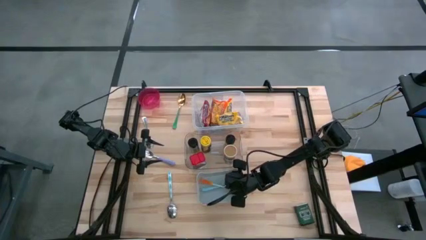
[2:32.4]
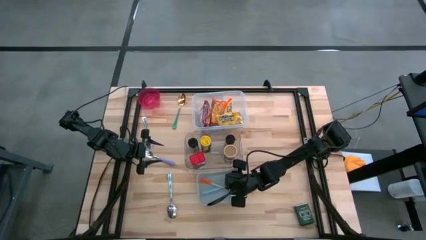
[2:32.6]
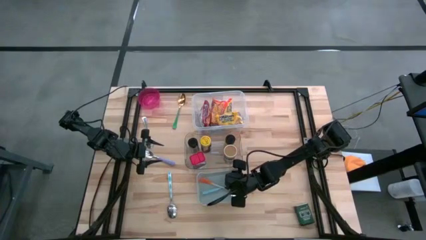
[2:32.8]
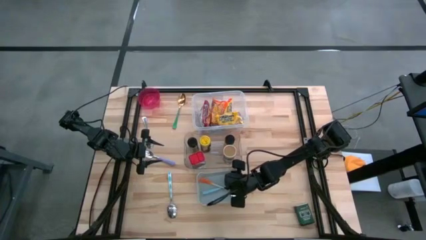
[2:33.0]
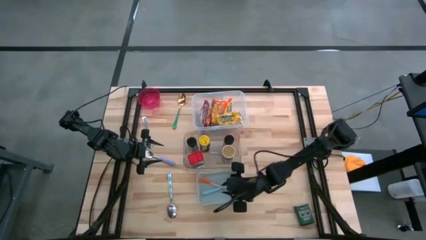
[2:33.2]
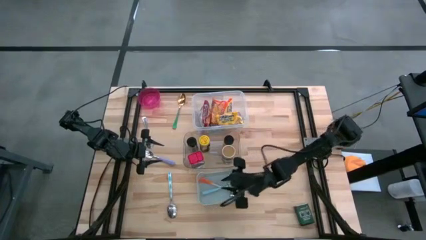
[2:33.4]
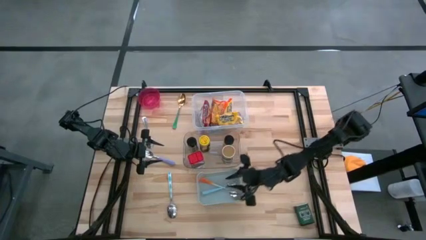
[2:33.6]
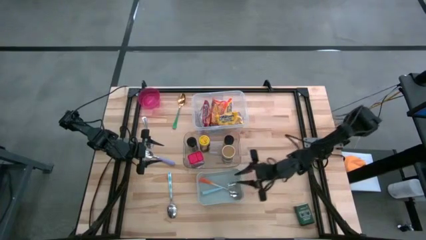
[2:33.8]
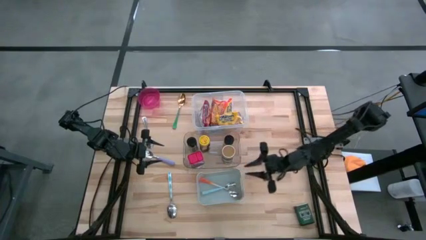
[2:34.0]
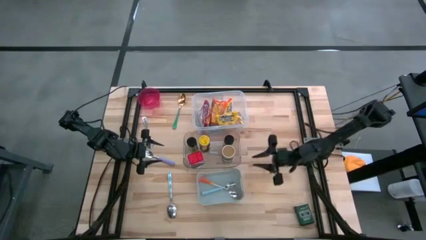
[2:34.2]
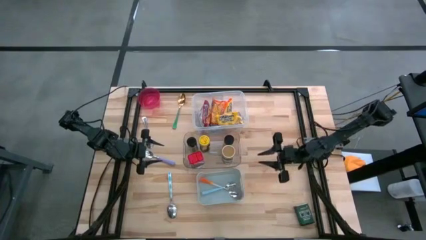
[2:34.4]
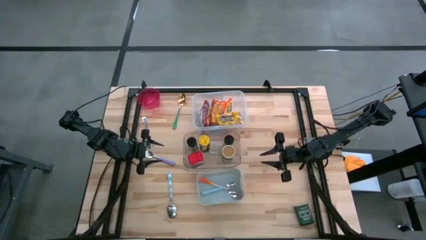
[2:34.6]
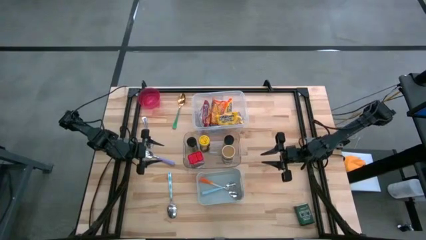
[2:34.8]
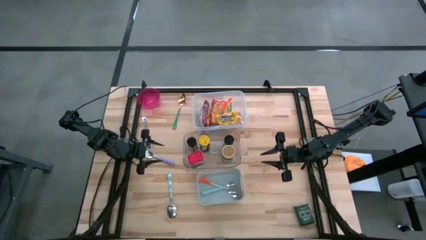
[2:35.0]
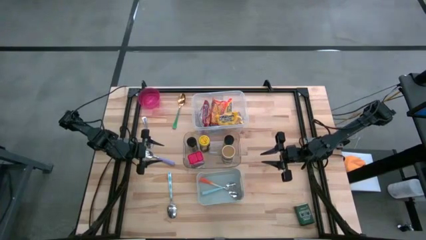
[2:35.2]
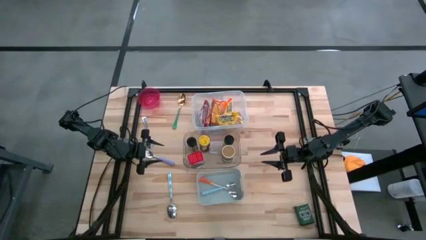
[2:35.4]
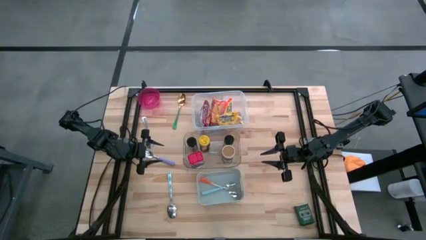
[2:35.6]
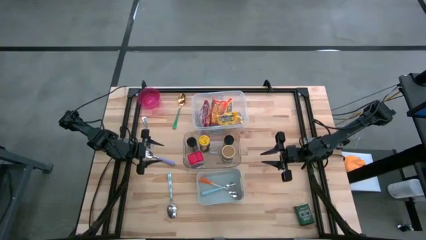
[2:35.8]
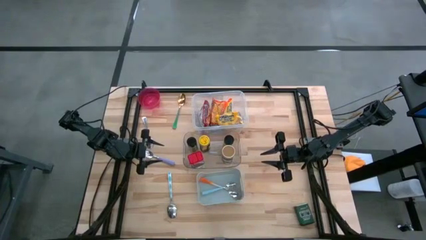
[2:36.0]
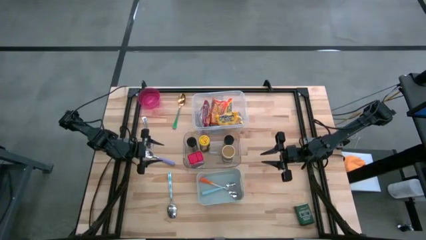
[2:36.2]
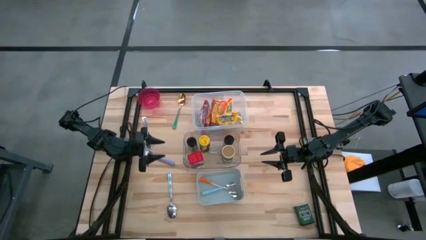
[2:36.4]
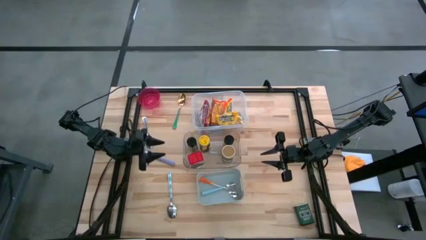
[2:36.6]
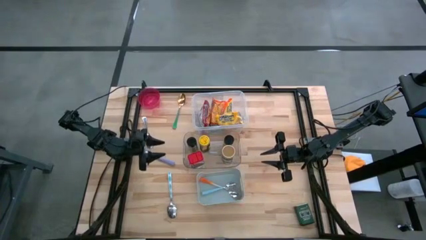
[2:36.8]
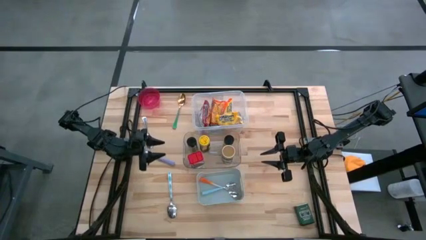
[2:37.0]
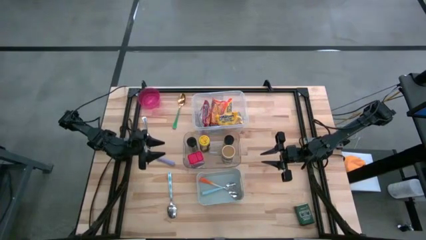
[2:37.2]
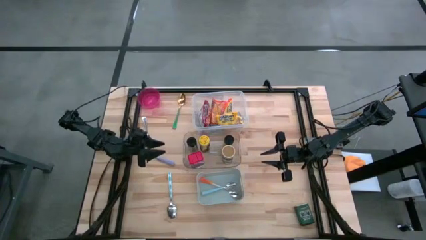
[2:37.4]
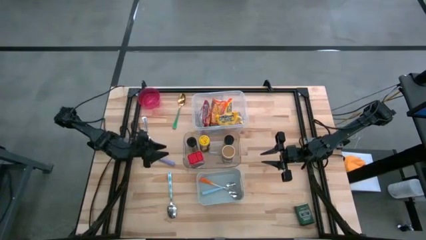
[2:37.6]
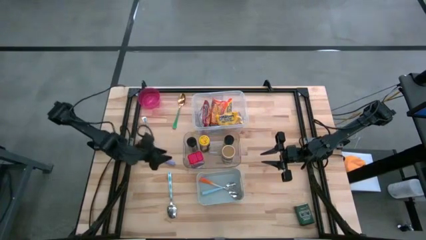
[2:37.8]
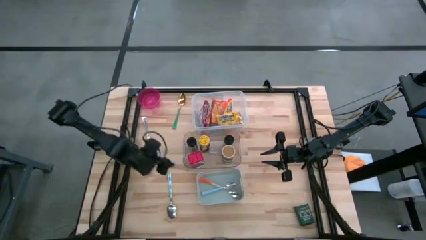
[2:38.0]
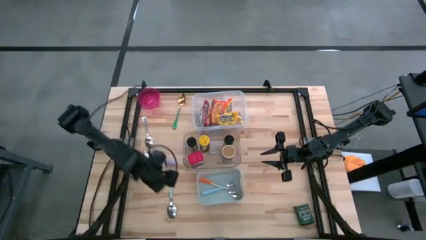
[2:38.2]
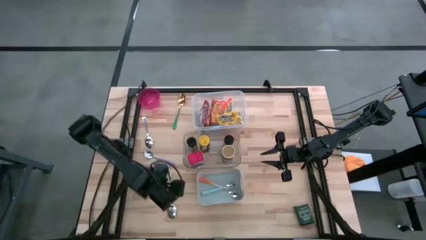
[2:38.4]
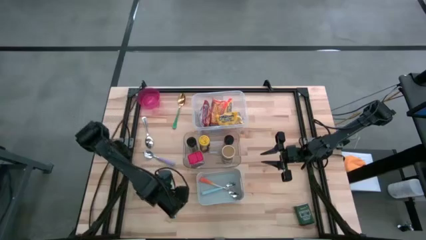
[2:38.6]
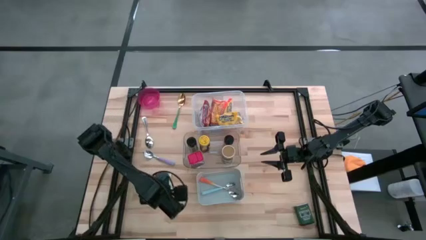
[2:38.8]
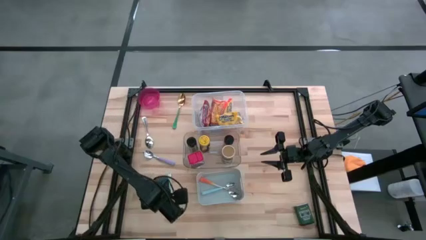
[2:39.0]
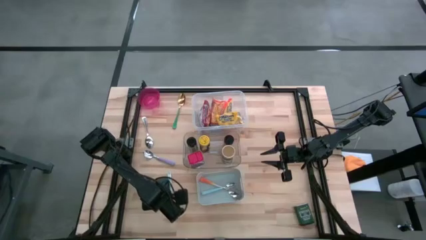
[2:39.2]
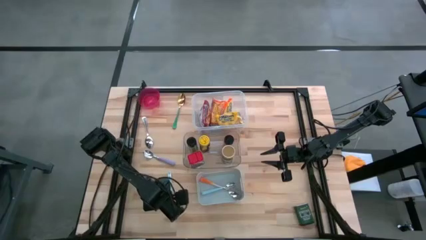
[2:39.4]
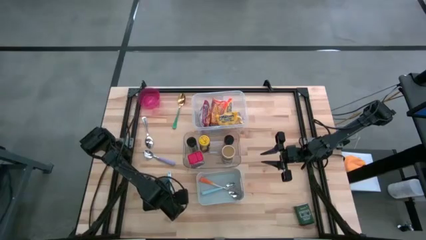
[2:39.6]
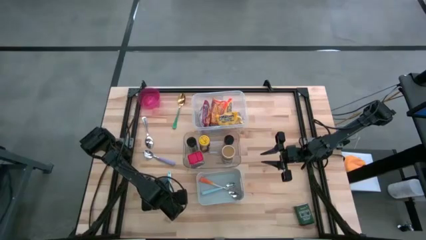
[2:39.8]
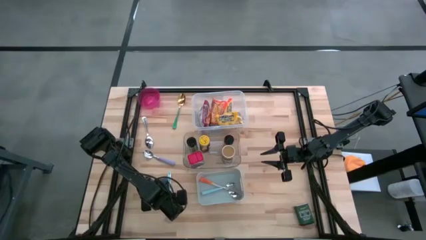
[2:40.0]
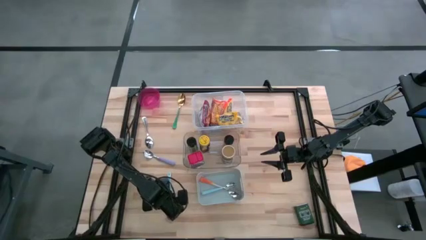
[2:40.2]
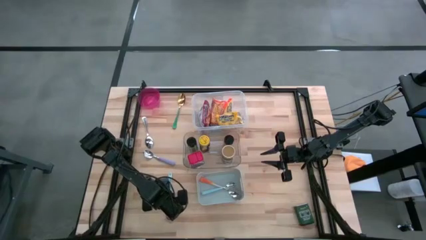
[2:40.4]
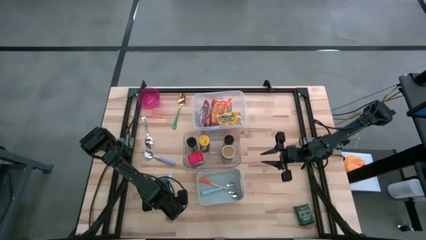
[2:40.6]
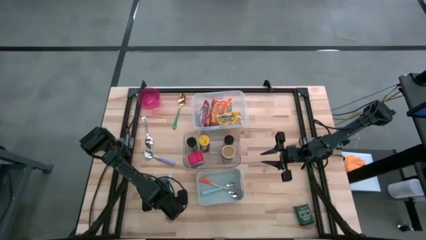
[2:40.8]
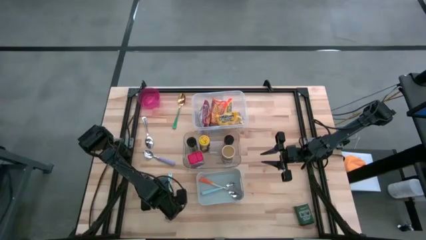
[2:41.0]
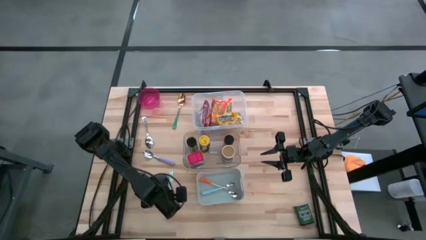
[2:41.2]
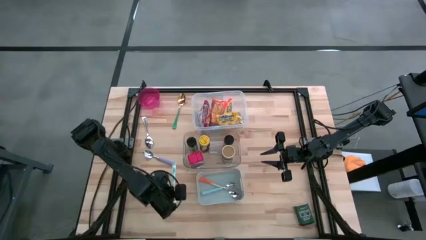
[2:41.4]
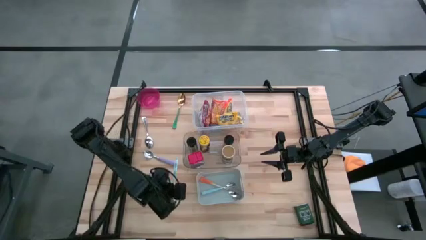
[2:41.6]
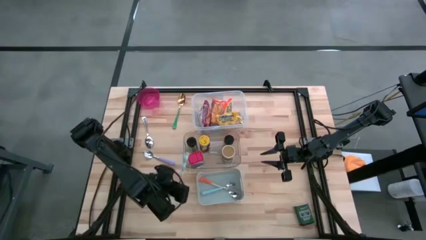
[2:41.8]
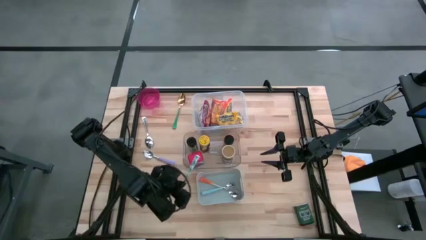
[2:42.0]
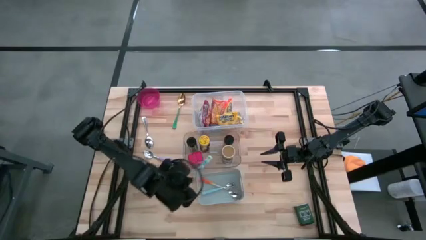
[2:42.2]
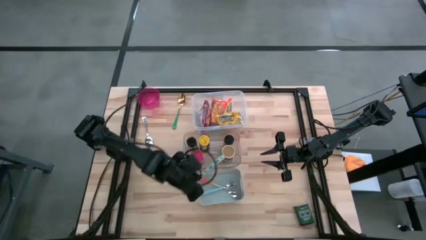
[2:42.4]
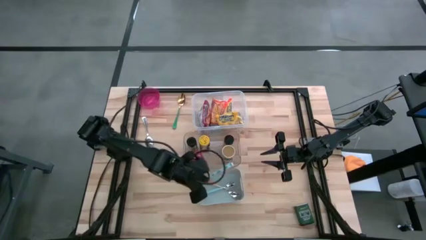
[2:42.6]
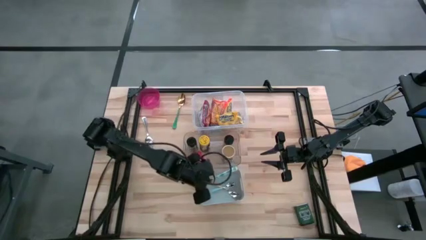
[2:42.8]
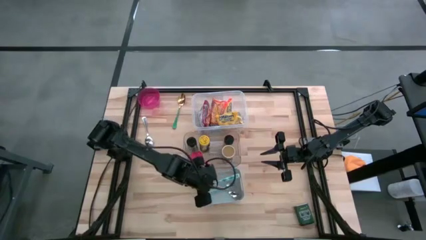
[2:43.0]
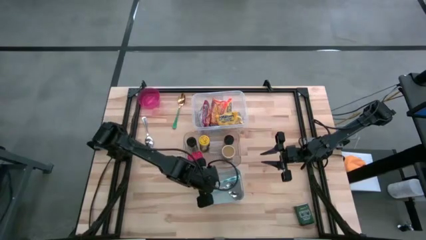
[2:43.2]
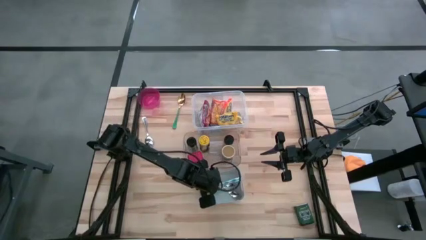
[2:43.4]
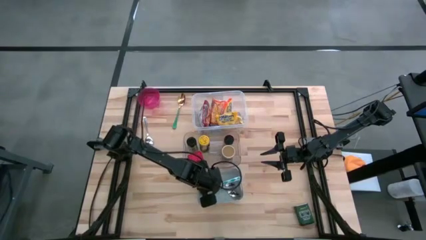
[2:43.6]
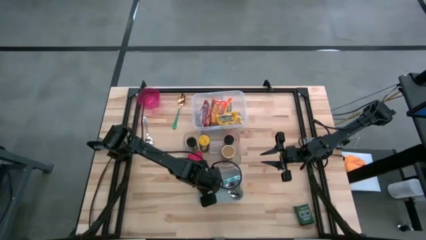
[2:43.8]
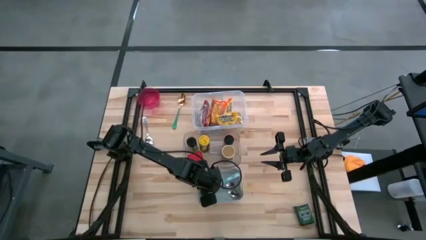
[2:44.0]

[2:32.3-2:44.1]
Put the blue patterned spoon into the gray bin
